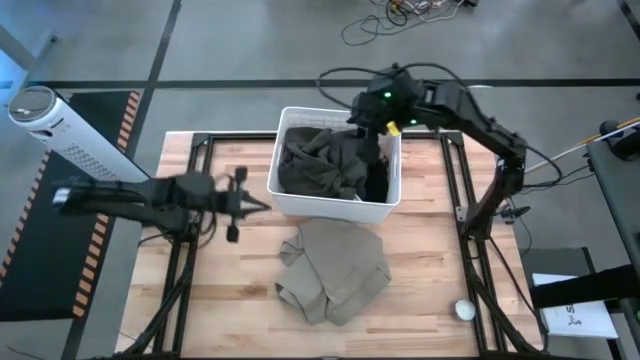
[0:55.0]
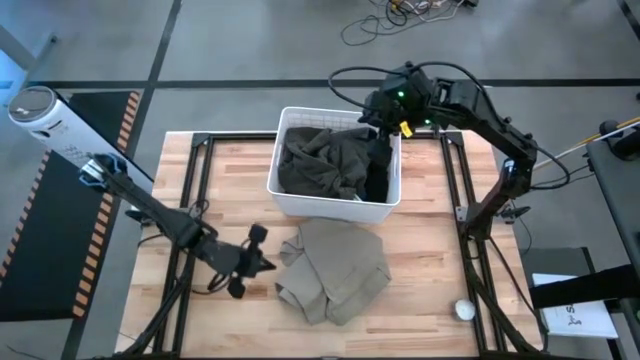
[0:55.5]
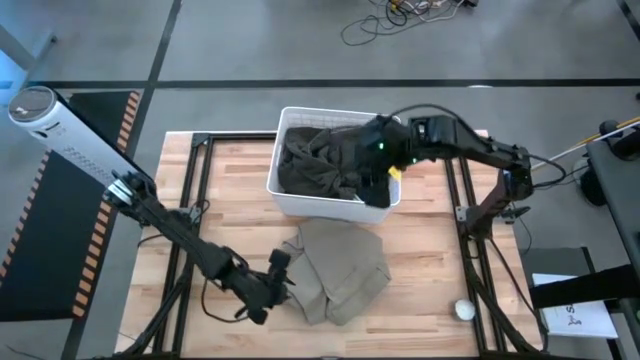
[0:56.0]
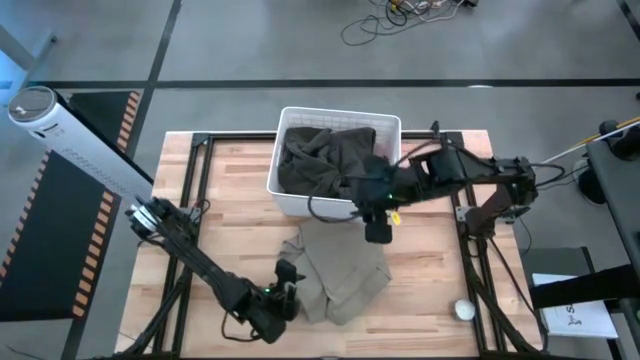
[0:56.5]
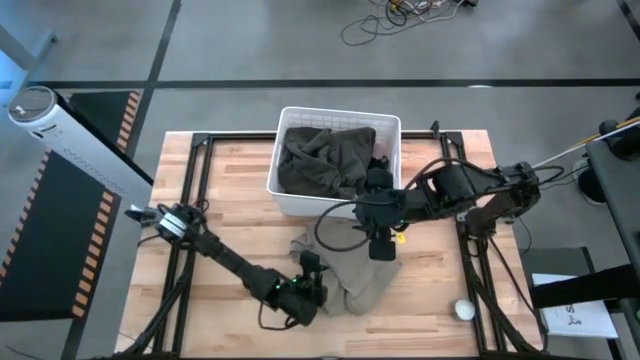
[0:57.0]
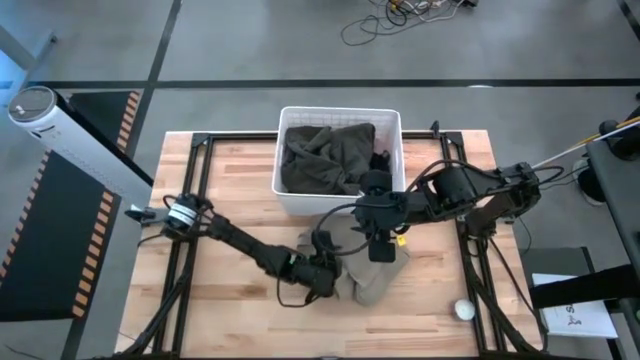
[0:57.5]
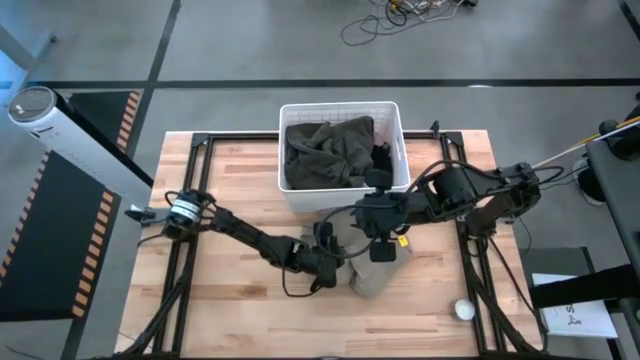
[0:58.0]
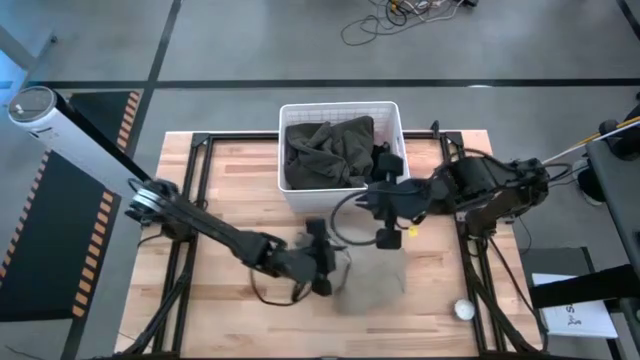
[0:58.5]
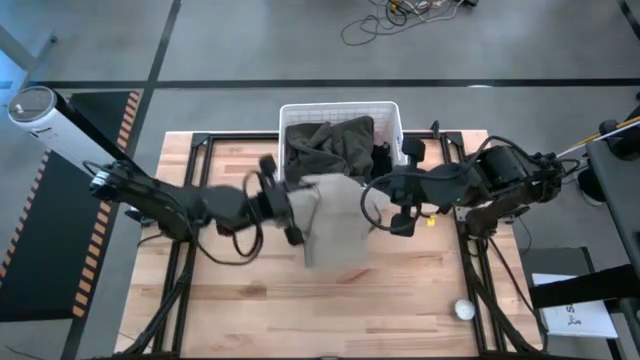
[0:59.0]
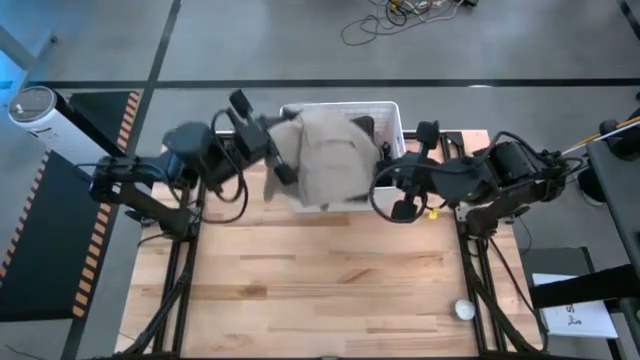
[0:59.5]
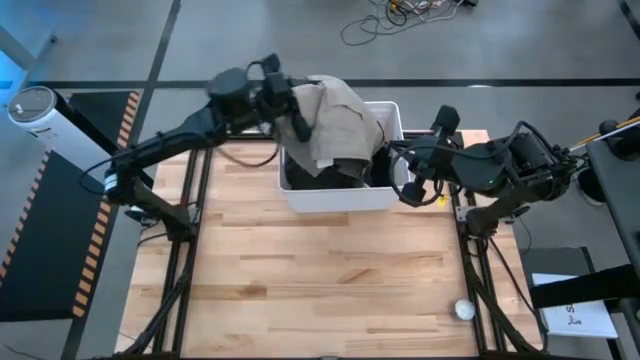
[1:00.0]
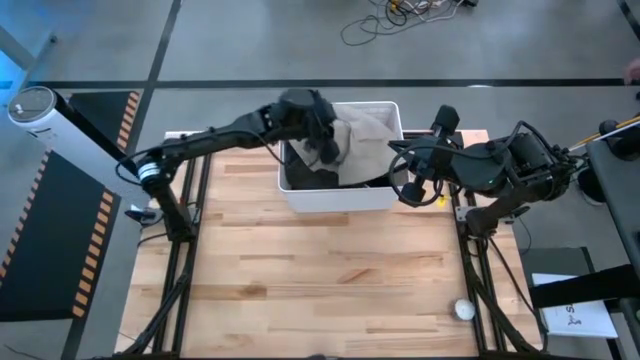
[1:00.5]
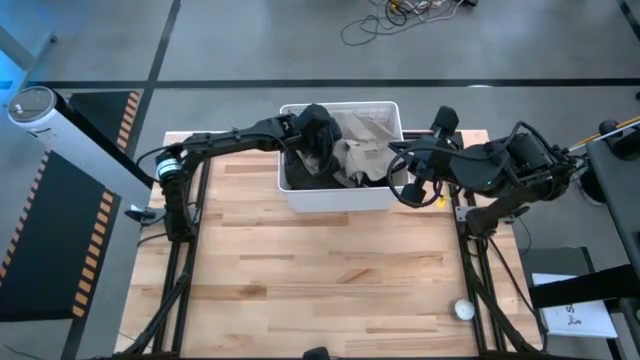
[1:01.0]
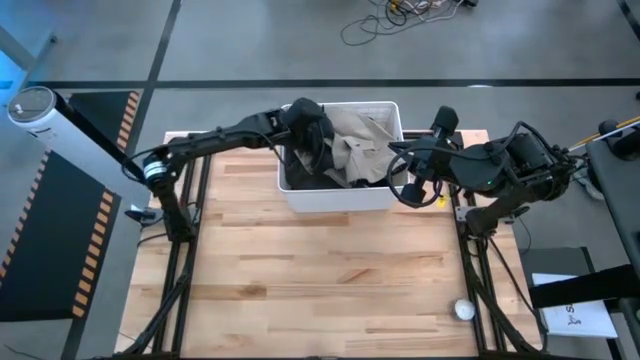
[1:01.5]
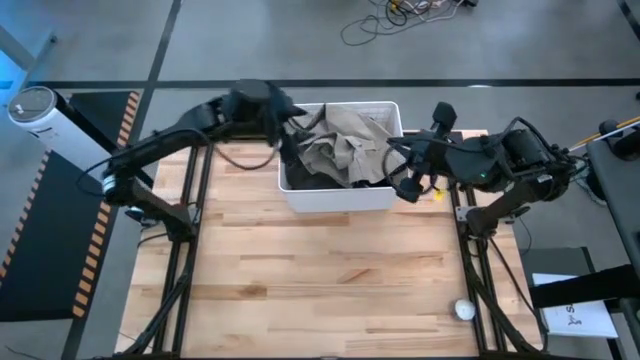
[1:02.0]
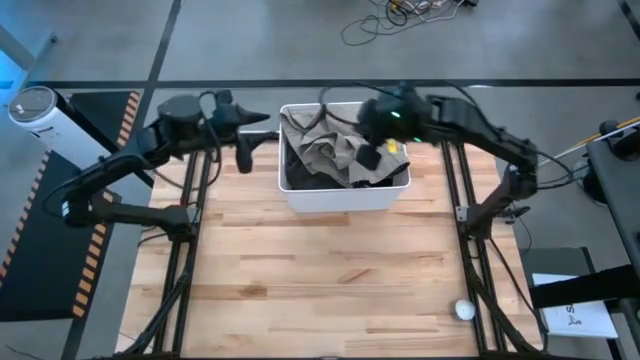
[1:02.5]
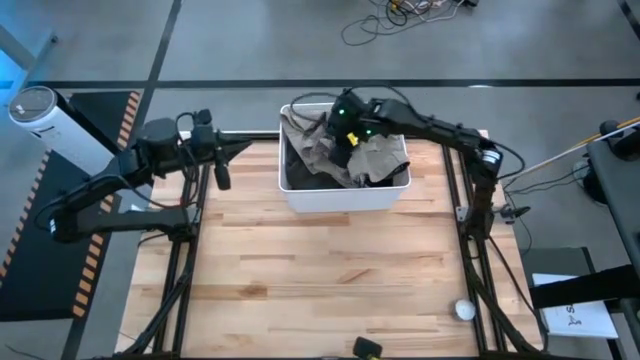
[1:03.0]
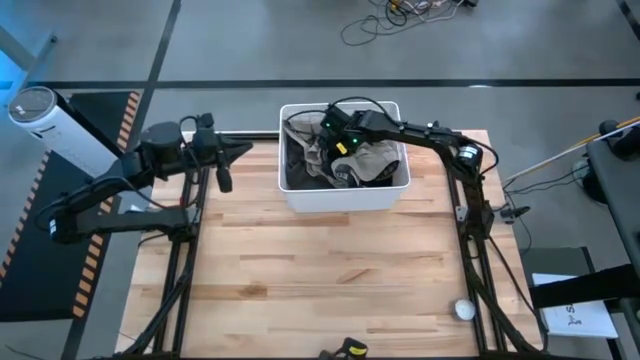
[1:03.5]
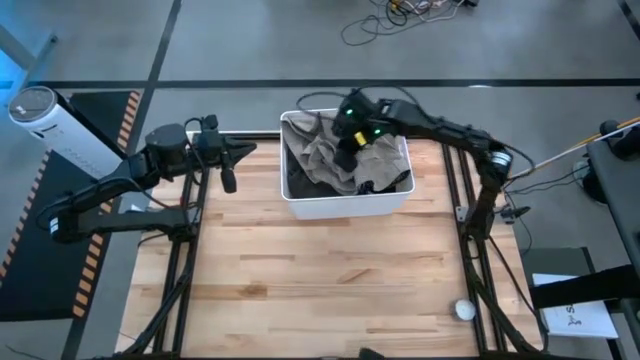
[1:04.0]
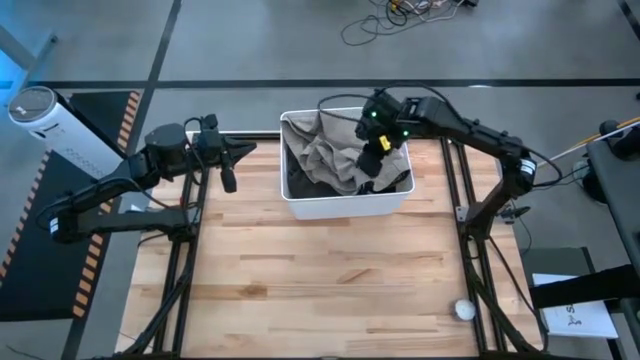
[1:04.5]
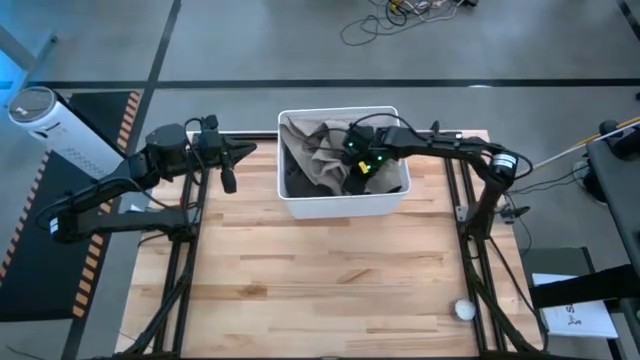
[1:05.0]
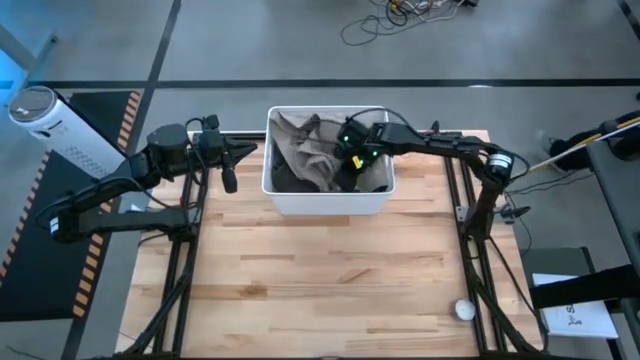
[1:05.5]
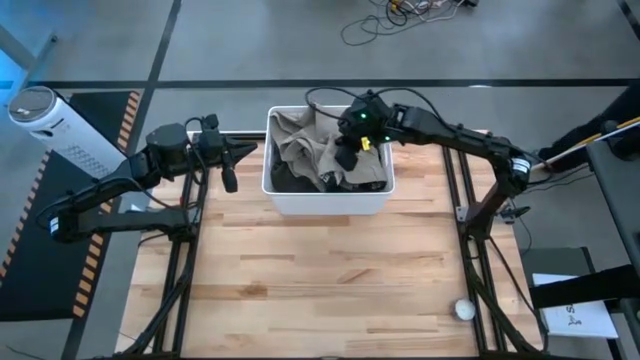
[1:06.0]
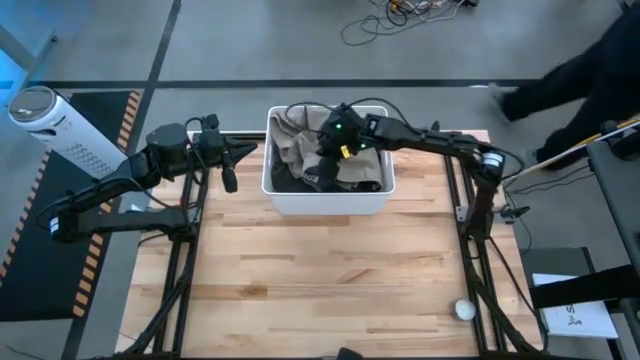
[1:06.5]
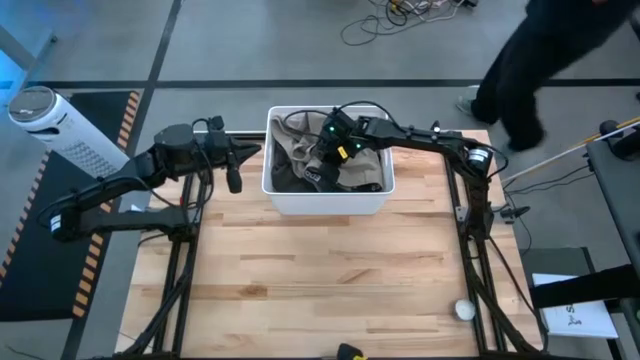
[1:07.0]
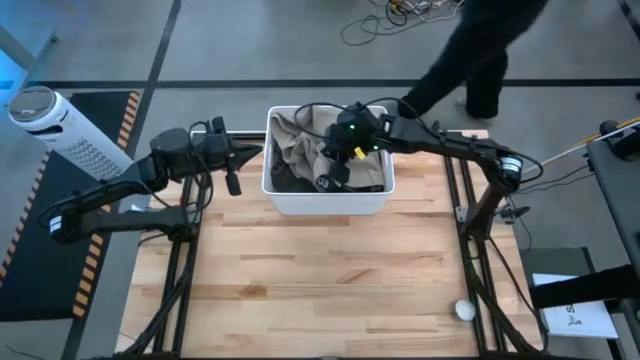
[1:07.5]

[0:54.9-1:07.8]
Task: Sort clothes
Put the brown pants into the white bin

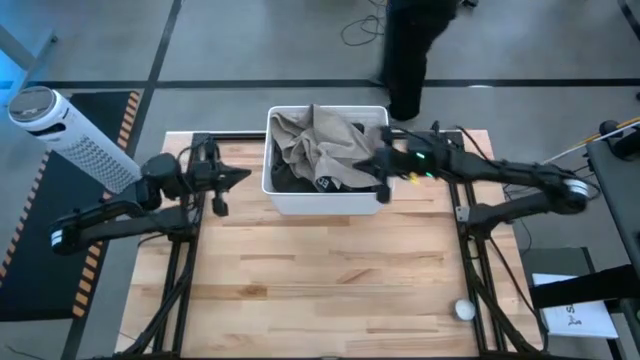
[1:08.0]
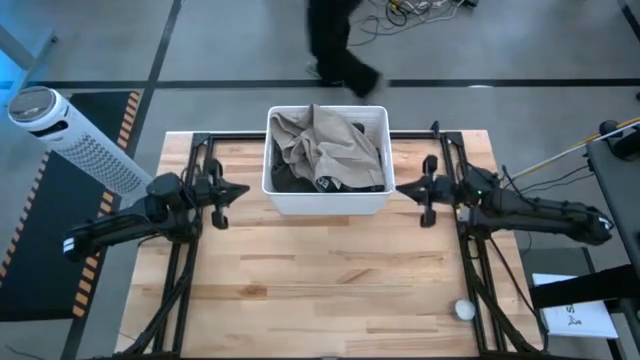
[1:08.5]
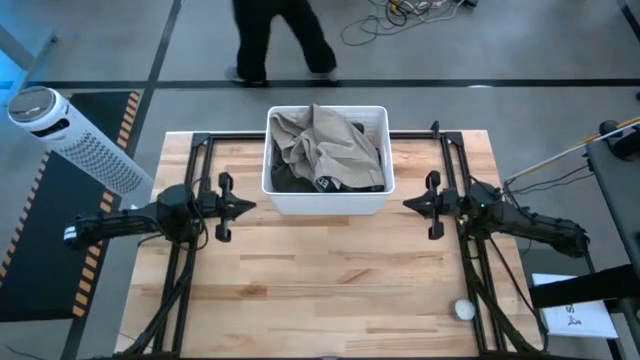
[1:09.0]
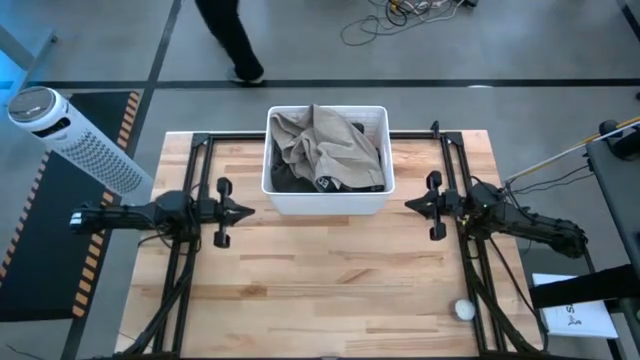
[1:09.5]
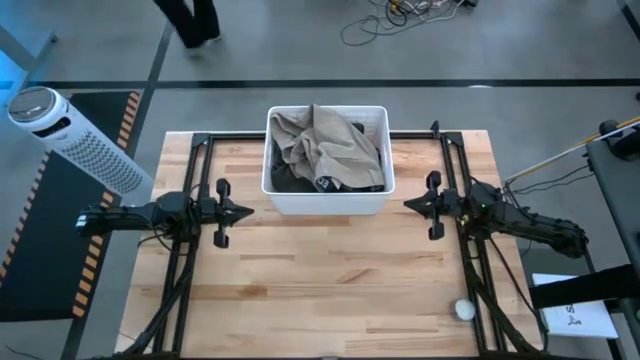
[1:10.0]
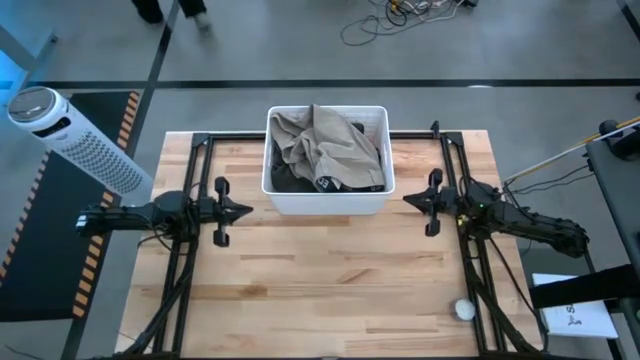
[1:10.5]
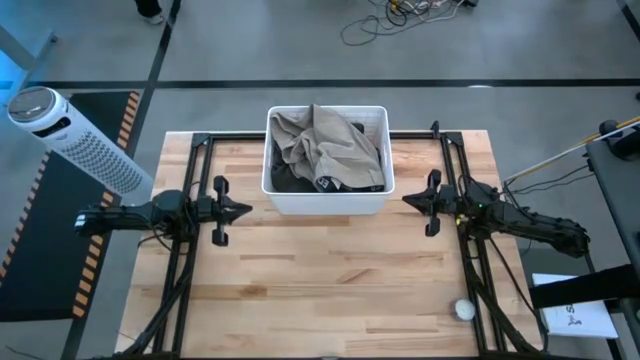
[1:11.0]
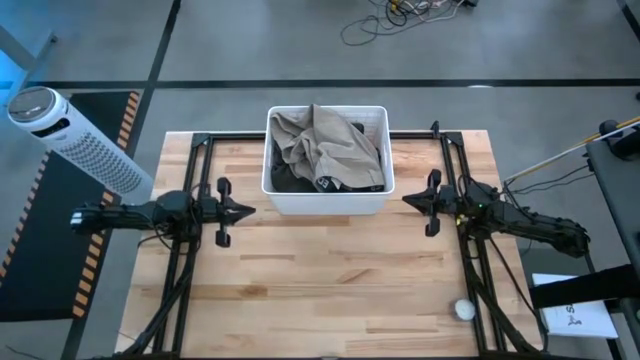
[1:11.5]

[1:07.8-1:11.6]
Return to Home Position

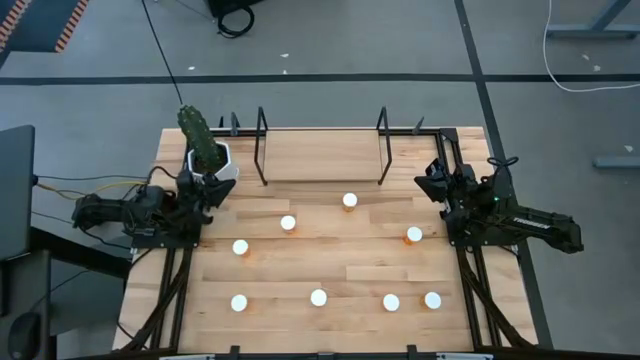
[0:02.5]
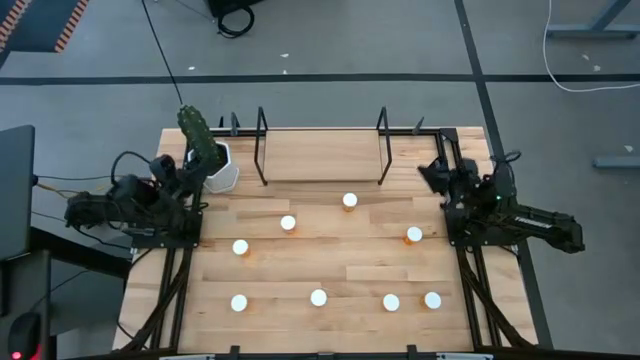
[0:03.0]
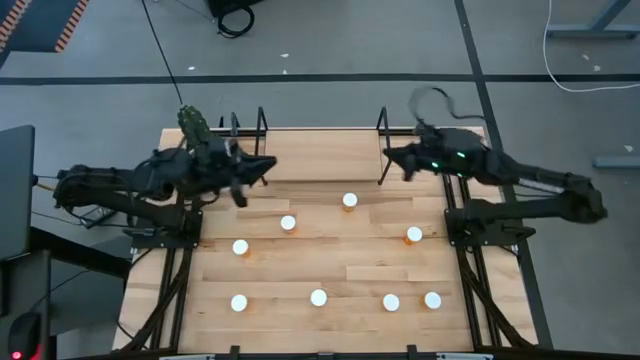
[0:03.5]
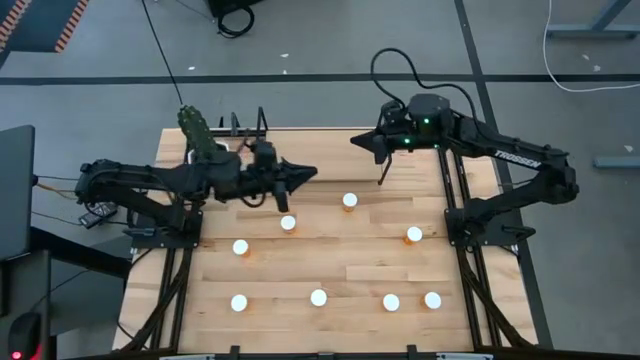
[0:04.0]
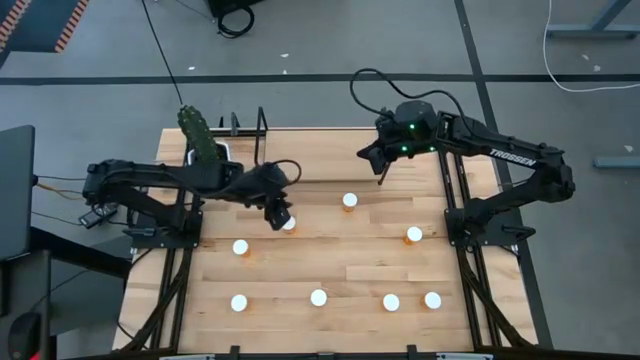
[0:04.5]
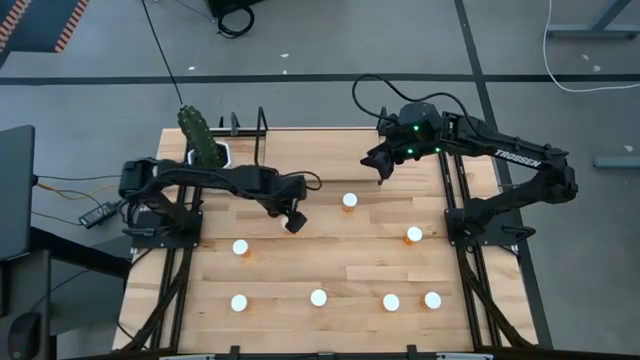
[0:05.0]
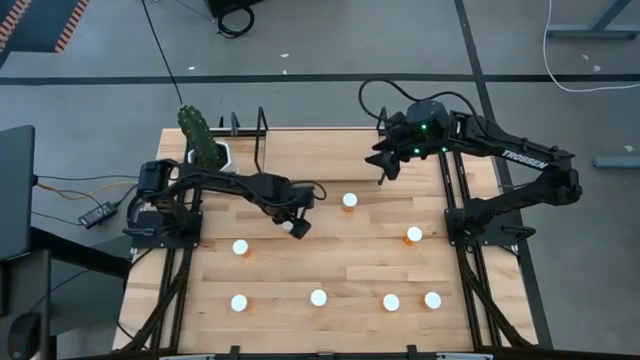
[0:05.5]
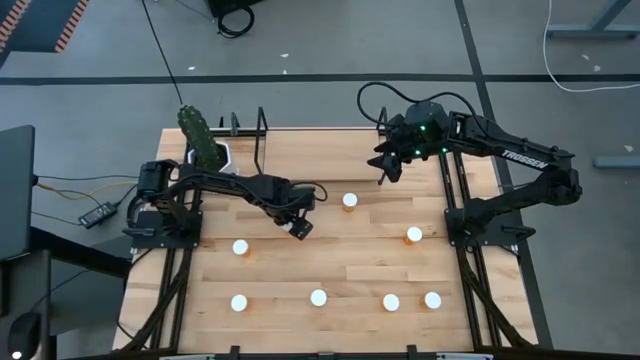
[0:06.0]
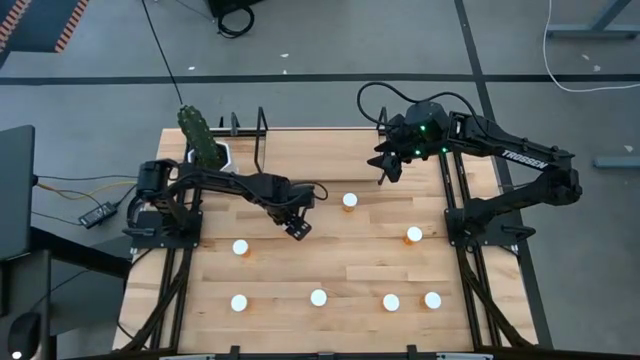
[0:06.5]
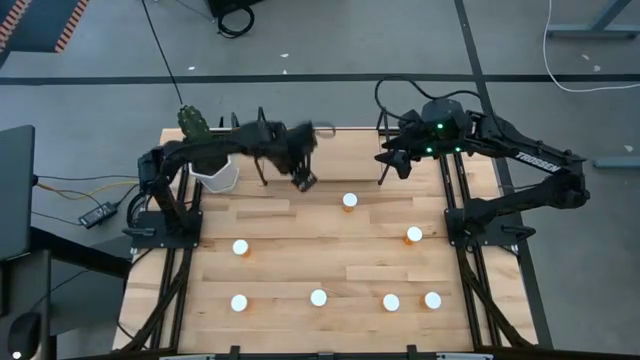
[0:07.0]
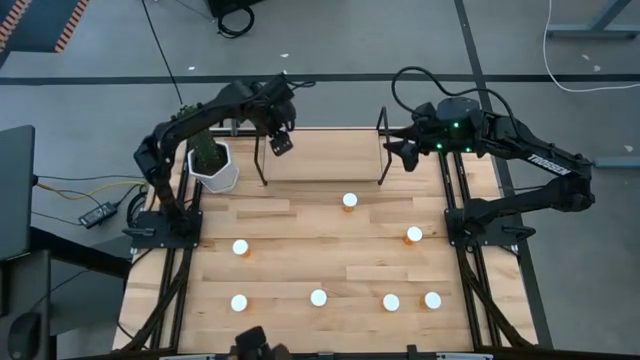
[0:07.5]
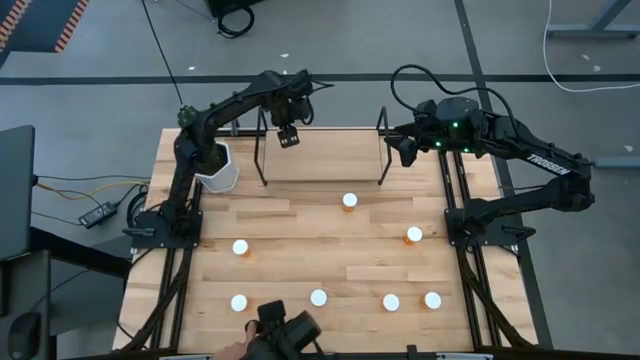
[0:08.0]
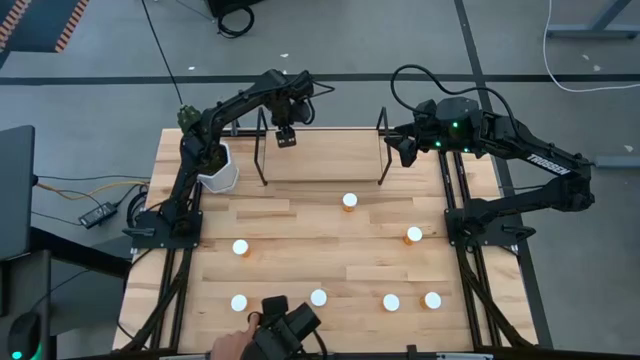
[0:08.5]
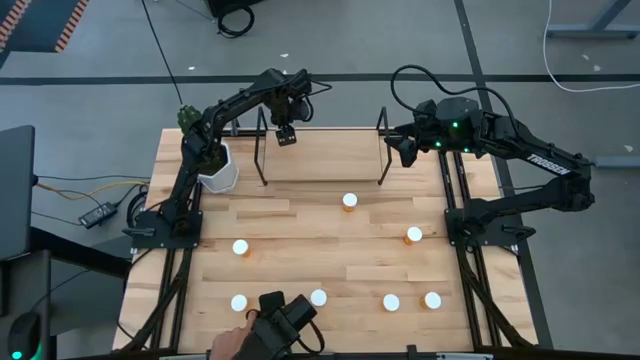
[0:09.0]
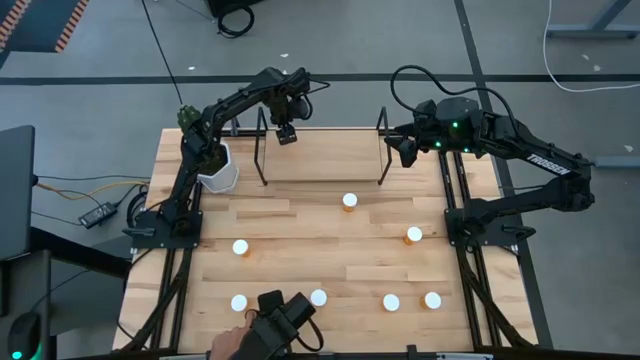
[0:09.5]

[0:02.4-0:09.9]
Task: Pick and place medicine bottles onto shelf by color
Put the orange pill bottle on the shelf
